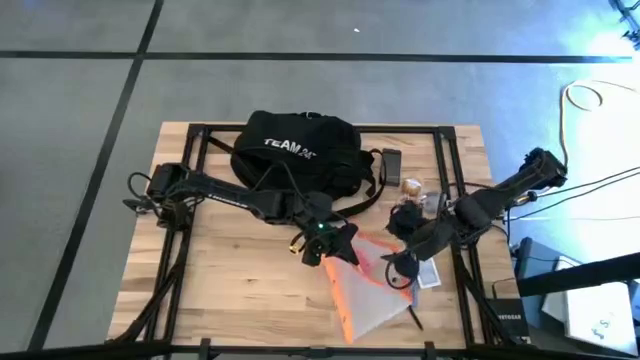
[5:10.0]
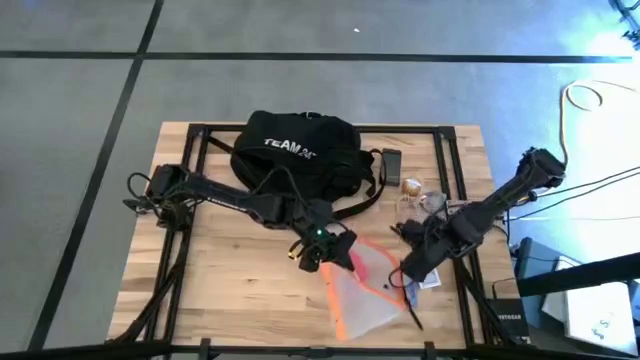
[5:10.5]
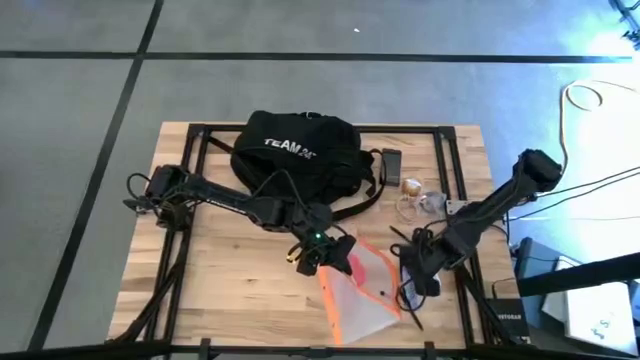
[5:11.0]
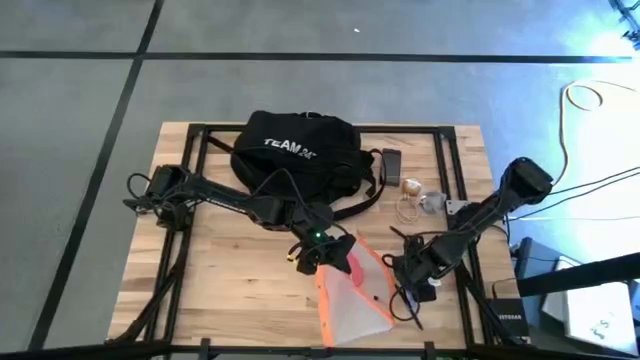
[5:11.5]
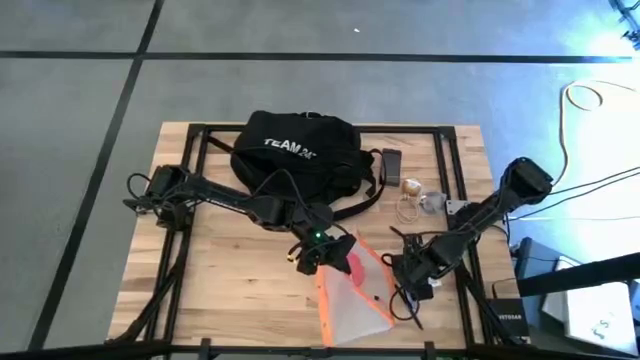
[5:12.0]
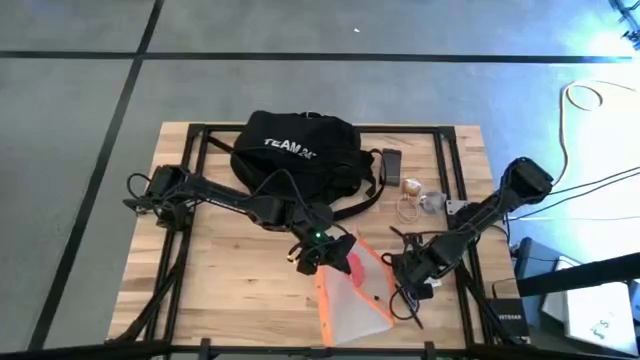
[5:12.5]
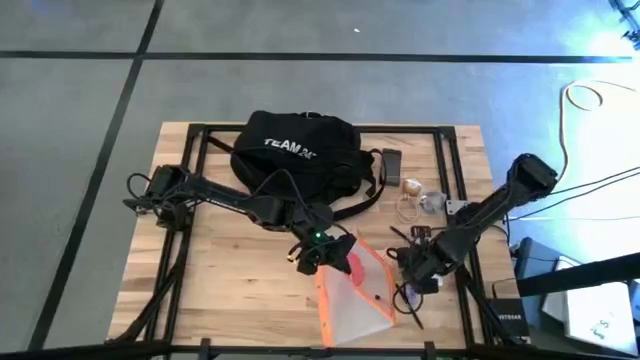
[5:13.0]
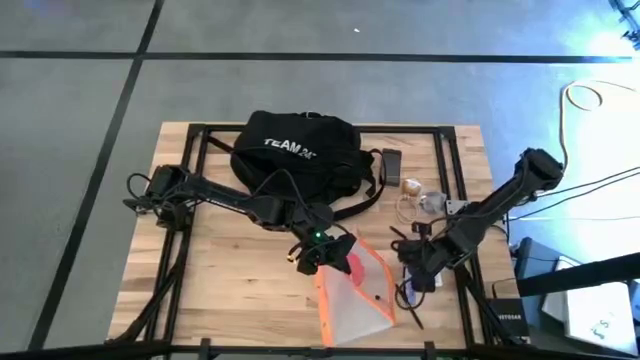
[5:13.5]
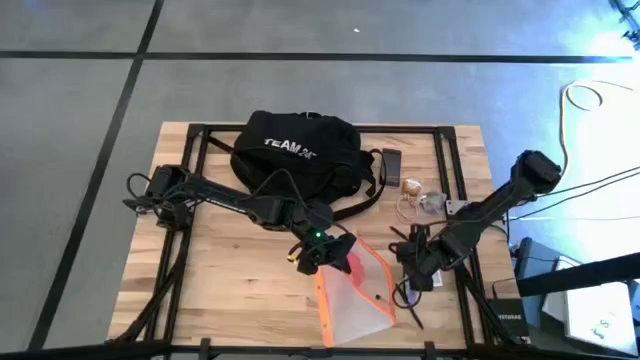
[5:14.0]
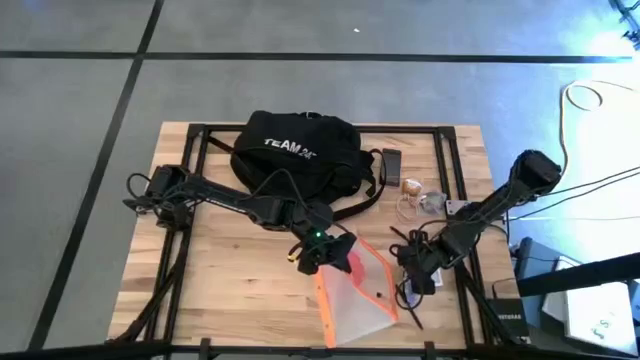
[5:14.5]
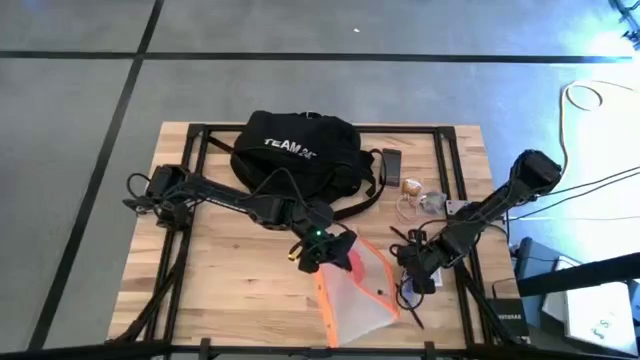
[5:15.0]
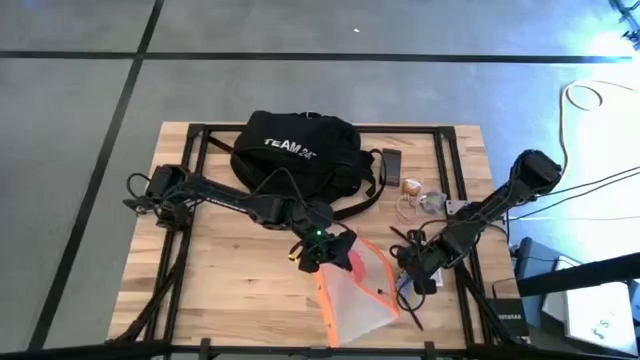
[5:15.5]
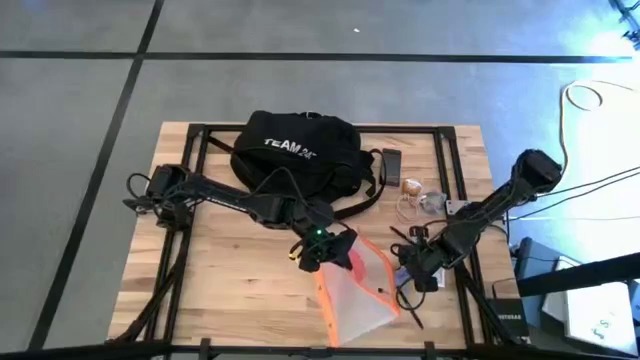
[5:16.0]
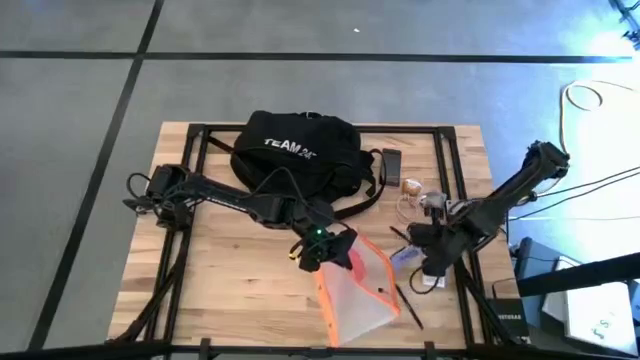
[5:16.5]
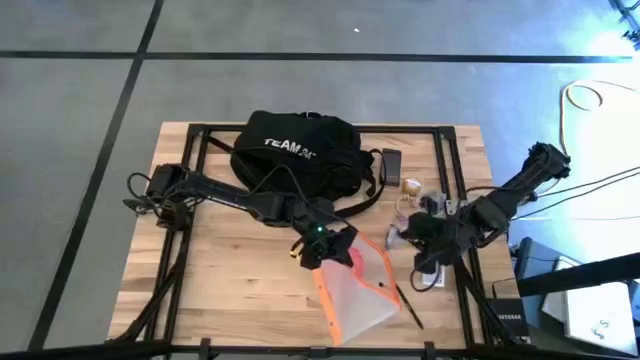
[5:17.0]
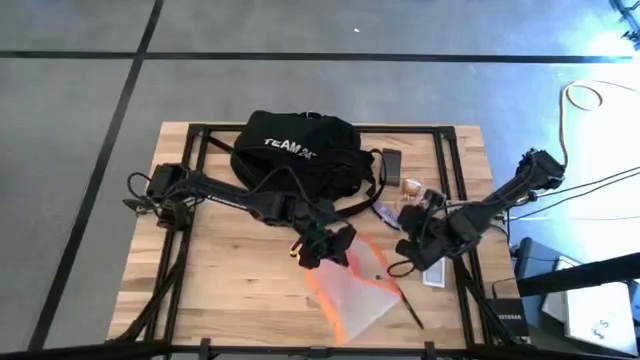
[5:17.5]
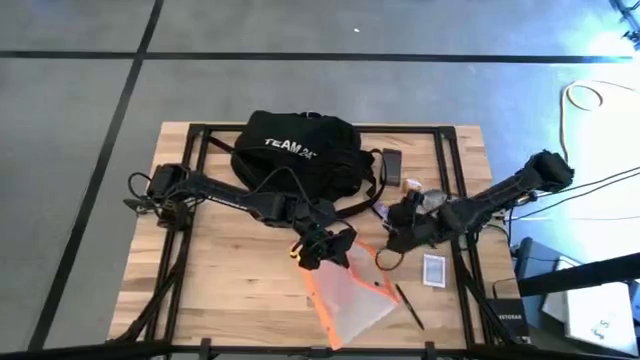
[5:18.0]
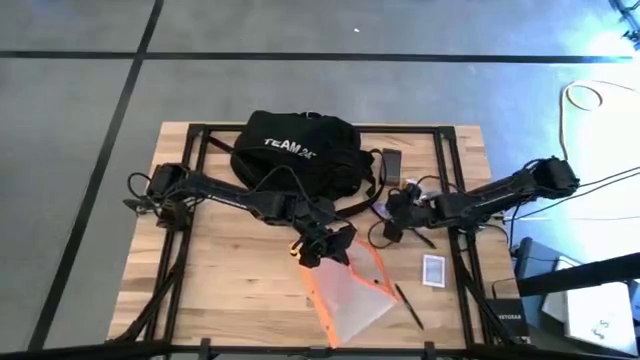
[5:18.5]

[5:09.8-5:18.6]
Task: Unpack backpack
Put the chocolate bar into the white zip bag

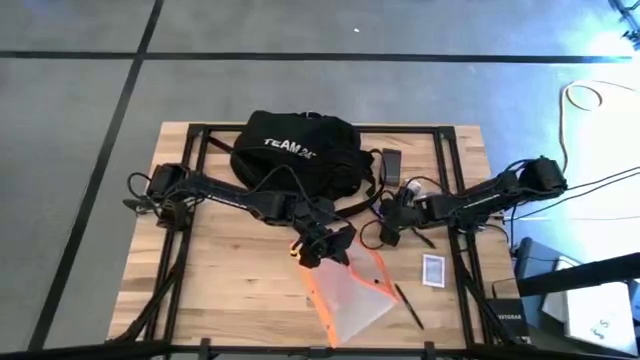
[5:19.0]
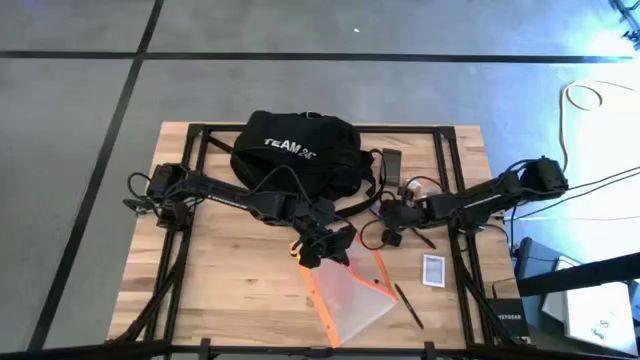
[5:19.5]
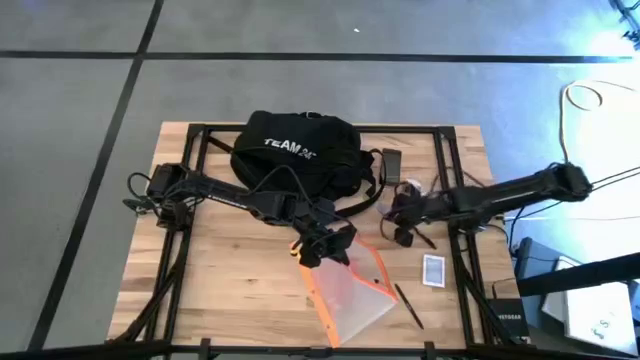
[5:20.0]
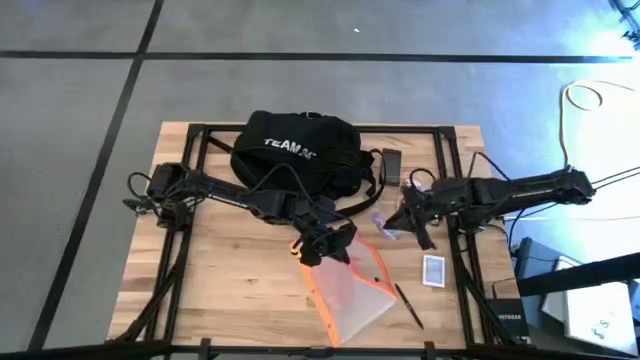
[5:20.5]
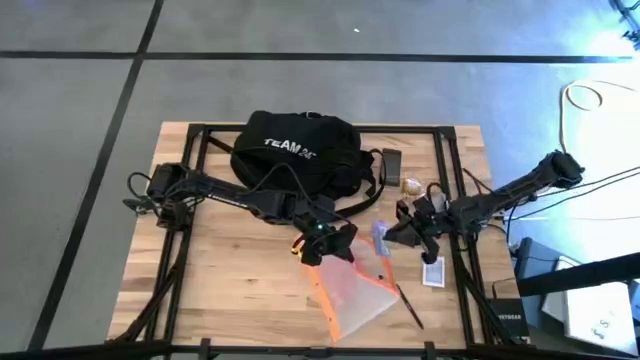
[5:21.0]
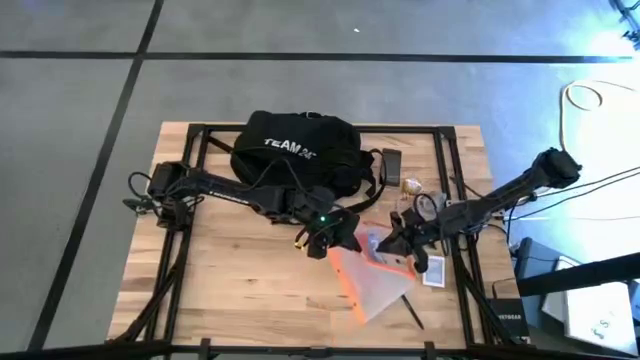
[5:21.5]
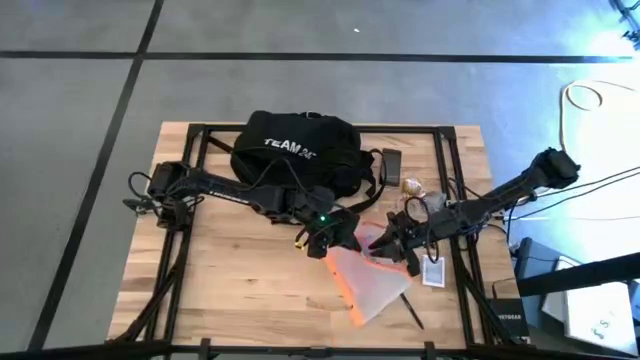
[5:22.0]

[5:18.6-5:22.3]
Put the chocolate bar into the white zip bag

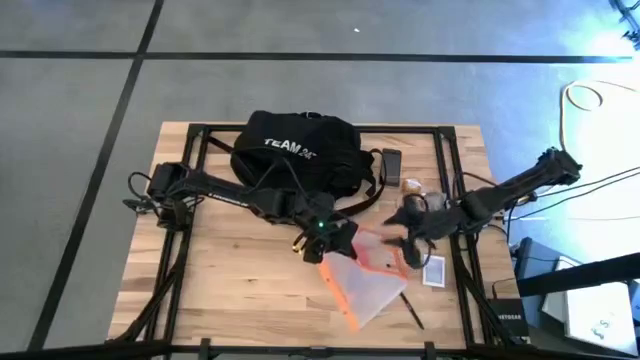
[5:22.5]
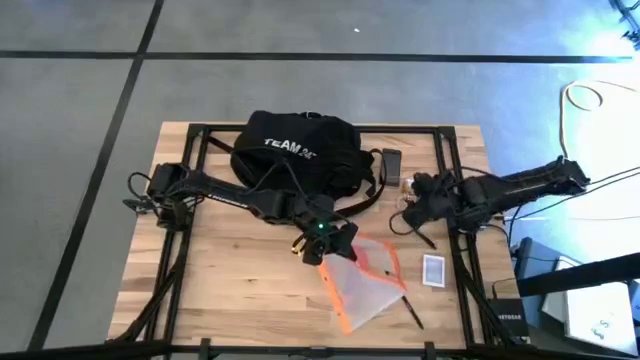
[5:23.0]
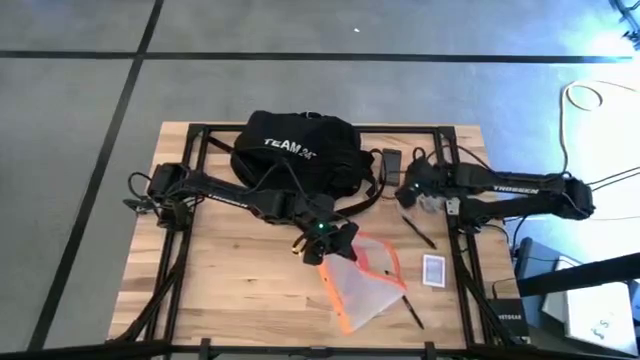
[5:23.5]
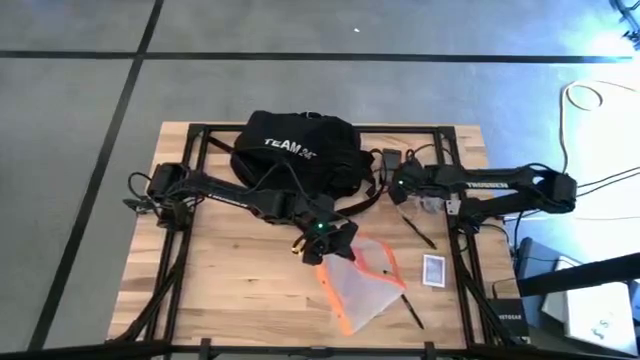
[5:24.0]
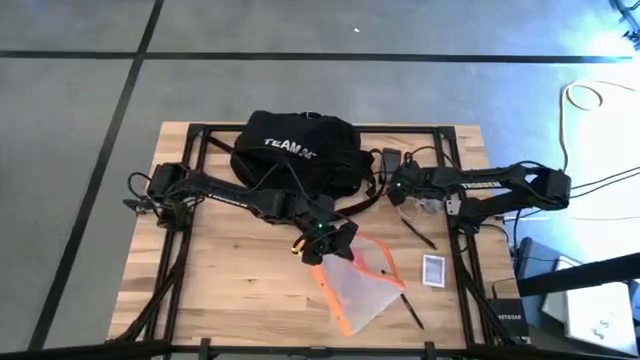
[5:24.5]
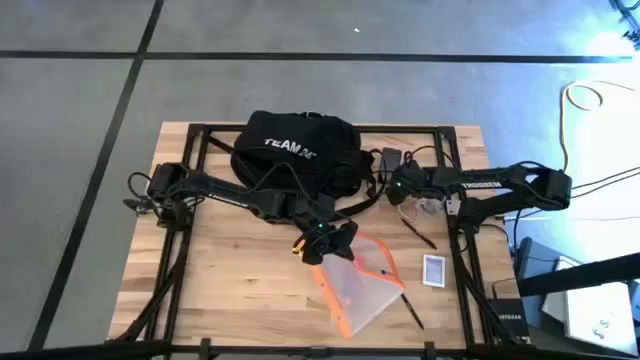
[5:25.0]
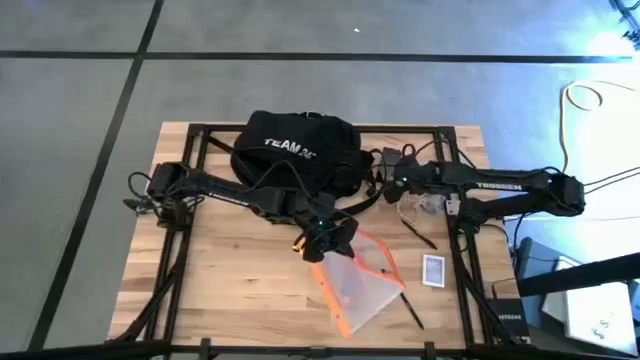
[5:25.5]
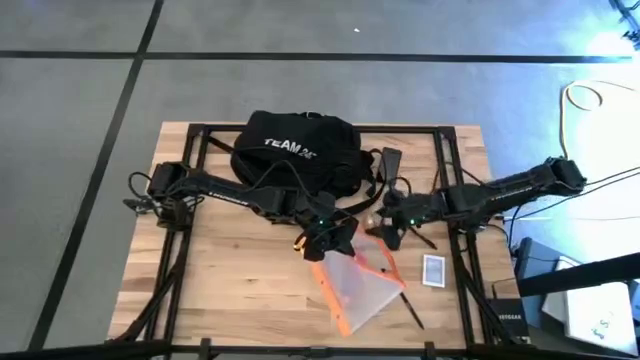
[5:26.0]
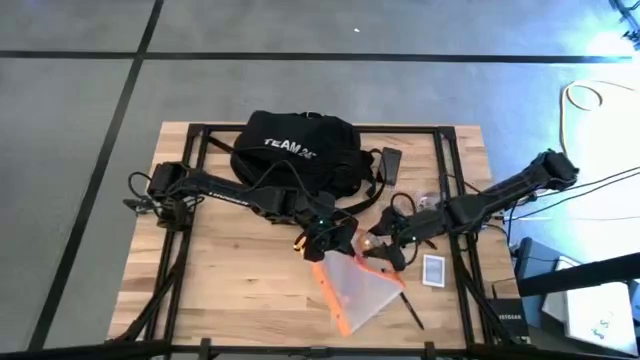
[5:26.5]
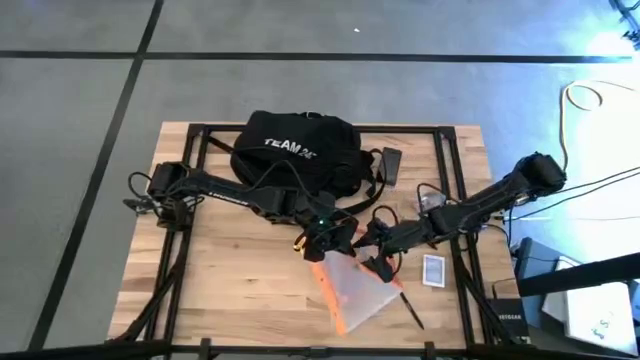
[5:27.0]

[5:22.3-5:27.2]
Put the candle wax box into the white zip bag

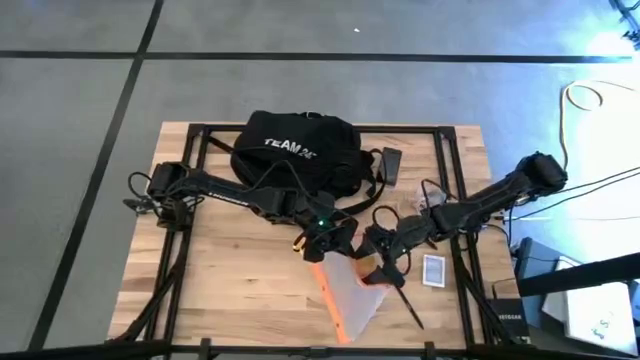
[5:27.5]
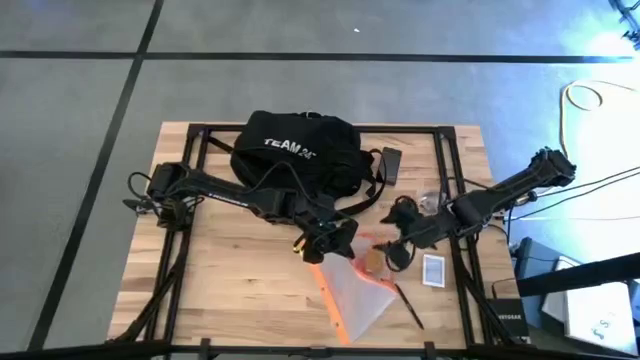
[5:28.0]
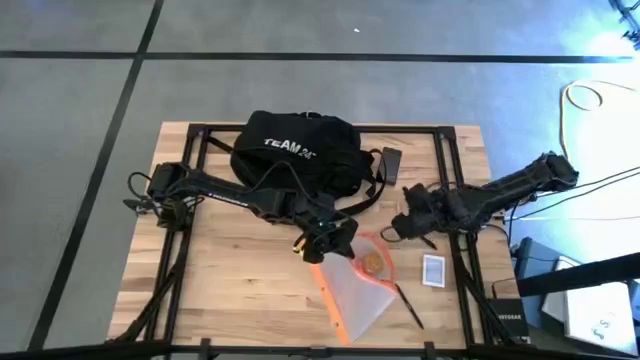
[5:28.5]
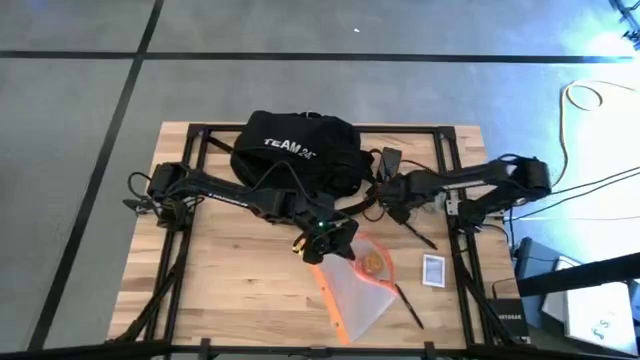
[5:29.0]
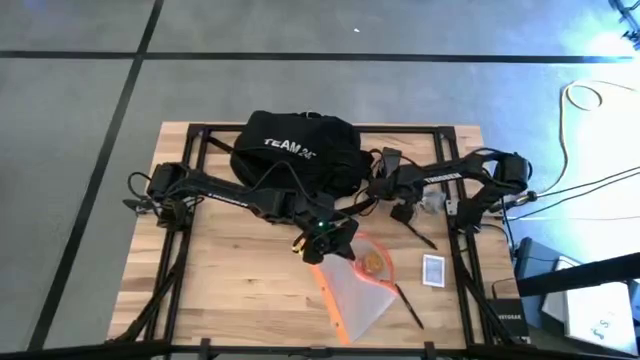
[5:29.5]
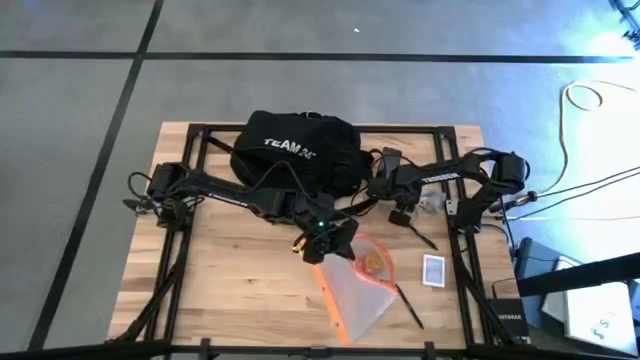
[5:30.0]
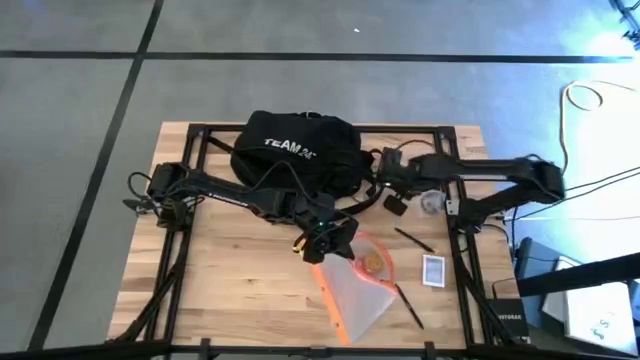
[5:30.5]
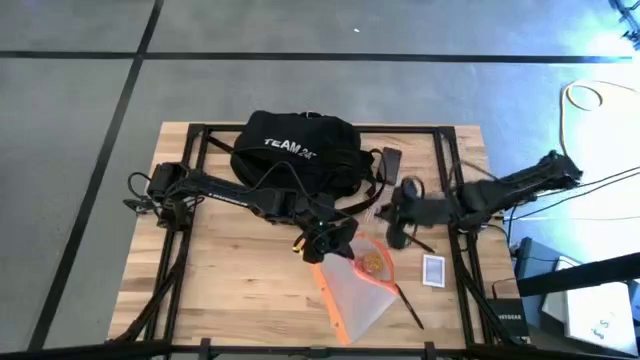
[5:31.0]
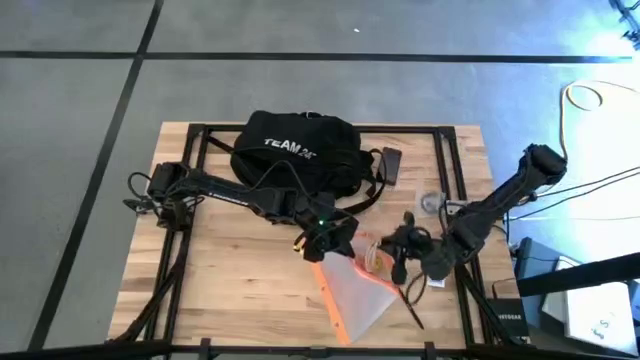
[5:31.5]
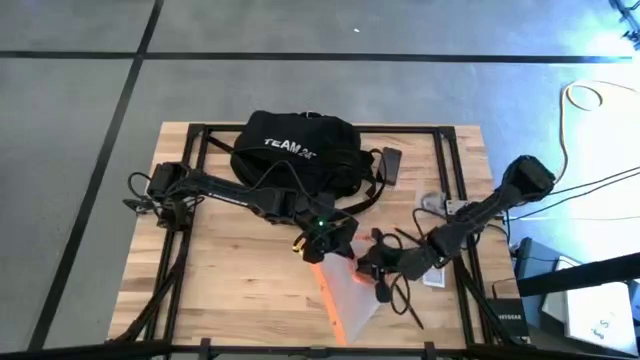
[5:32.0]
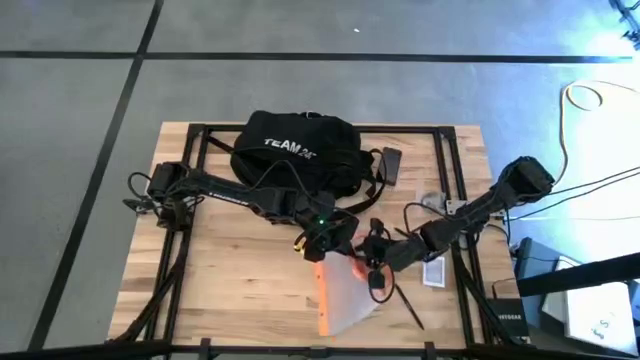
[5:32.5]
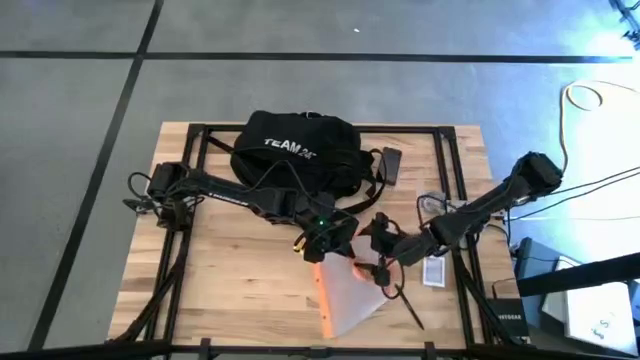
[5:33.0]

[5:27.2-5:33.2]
Put the white charger cable into the white zip bag
